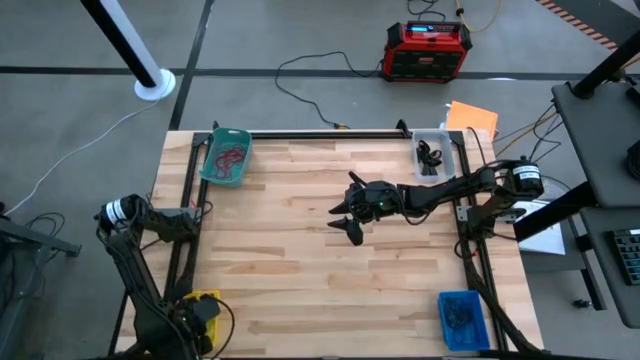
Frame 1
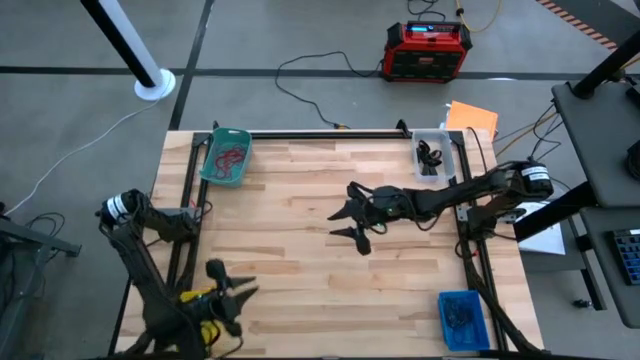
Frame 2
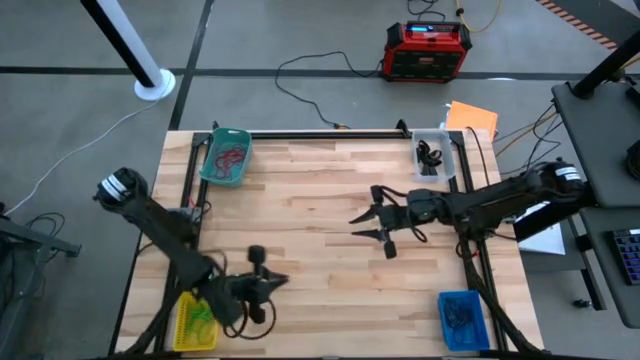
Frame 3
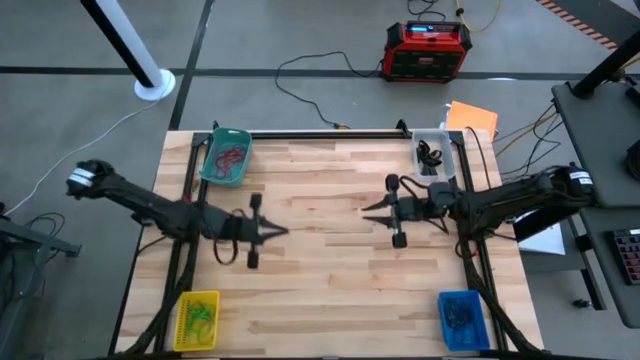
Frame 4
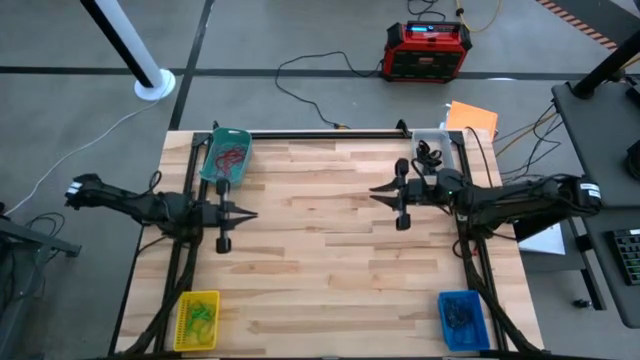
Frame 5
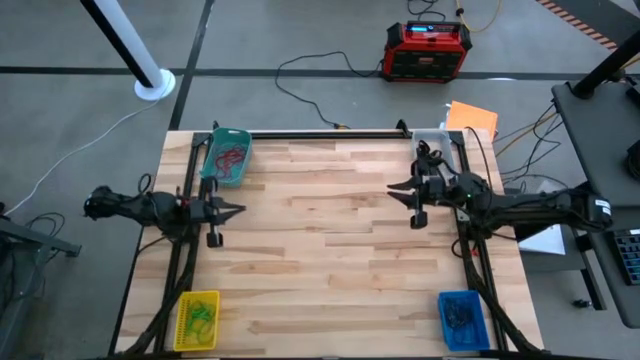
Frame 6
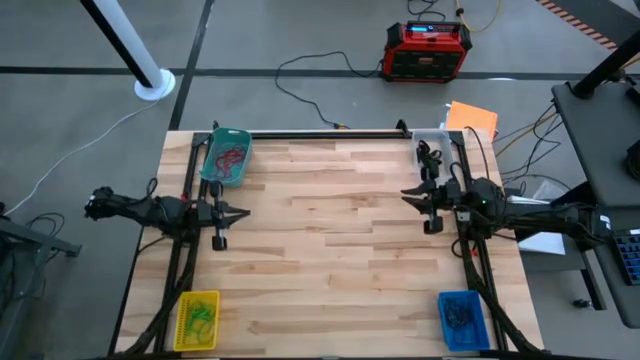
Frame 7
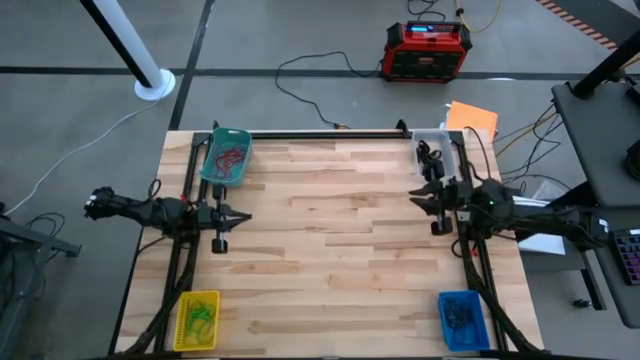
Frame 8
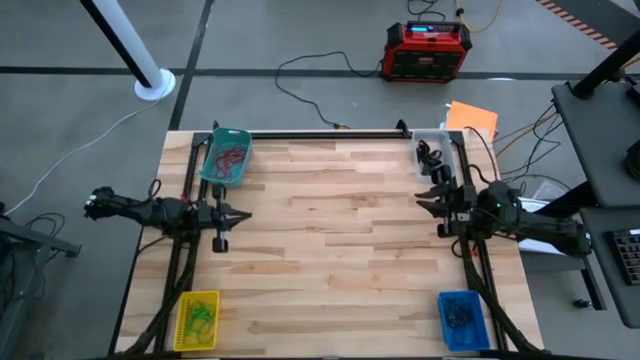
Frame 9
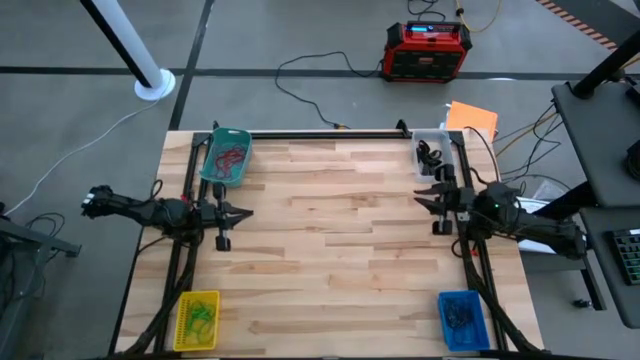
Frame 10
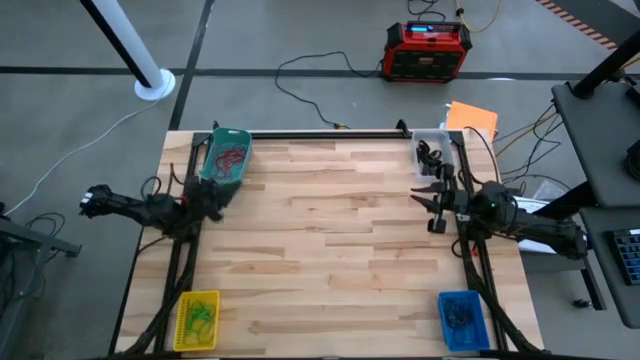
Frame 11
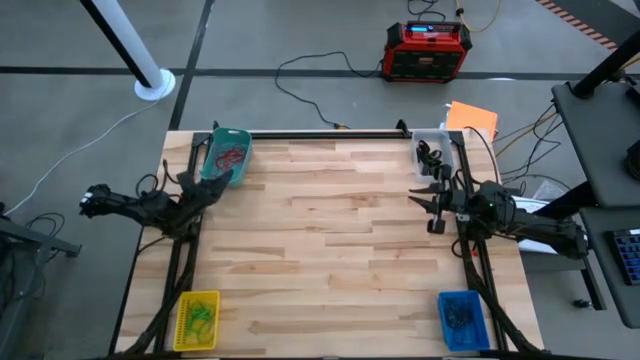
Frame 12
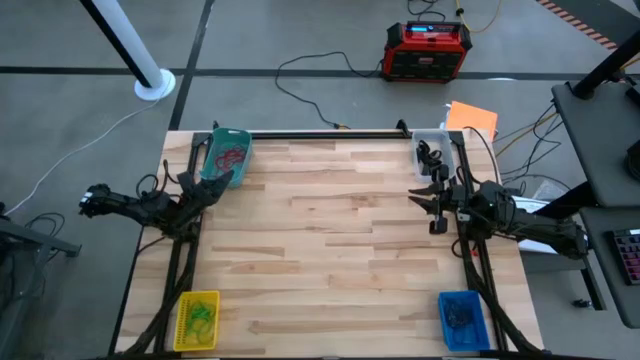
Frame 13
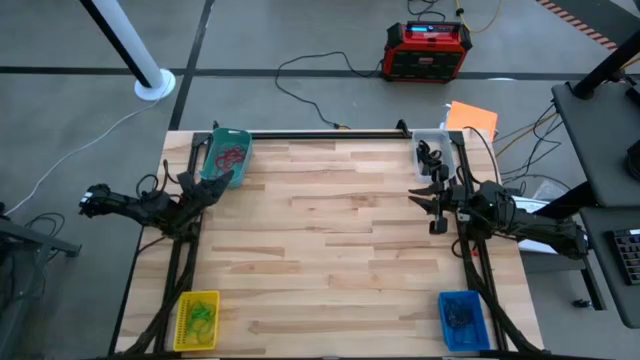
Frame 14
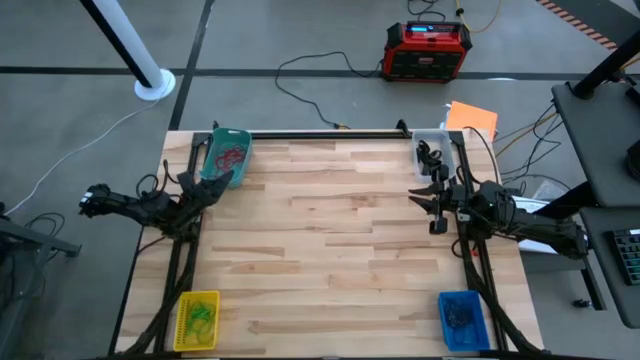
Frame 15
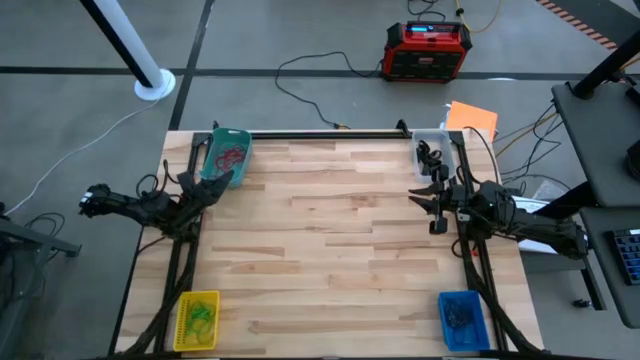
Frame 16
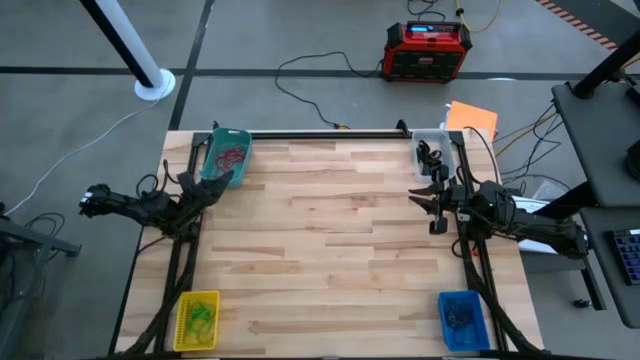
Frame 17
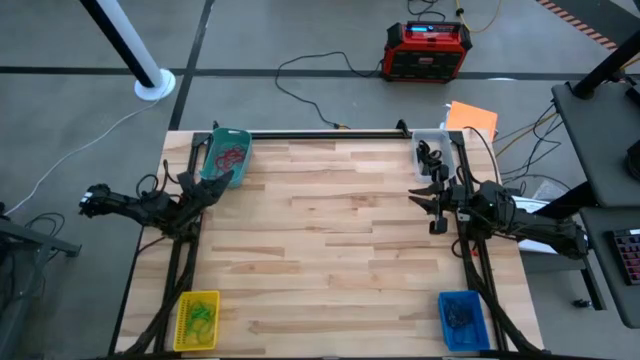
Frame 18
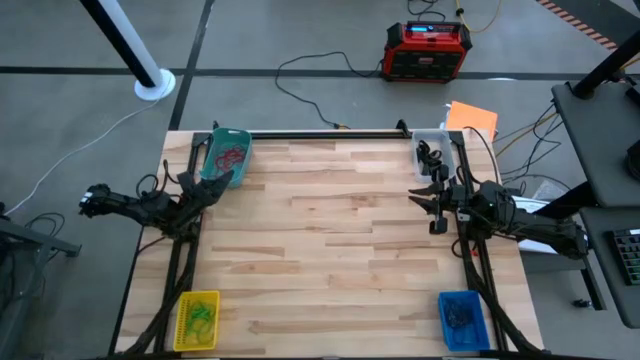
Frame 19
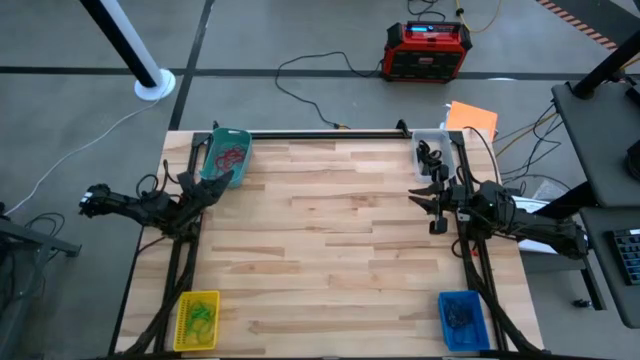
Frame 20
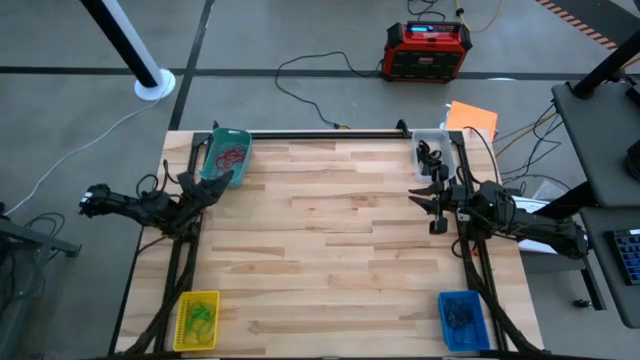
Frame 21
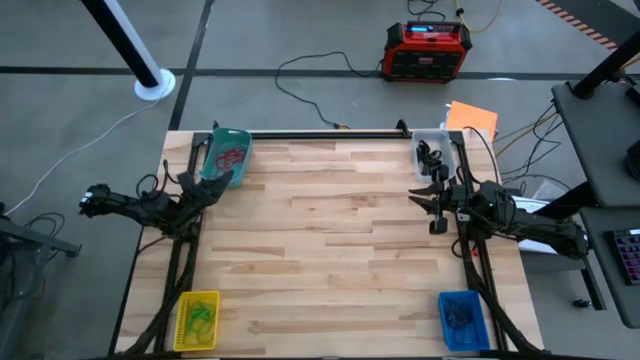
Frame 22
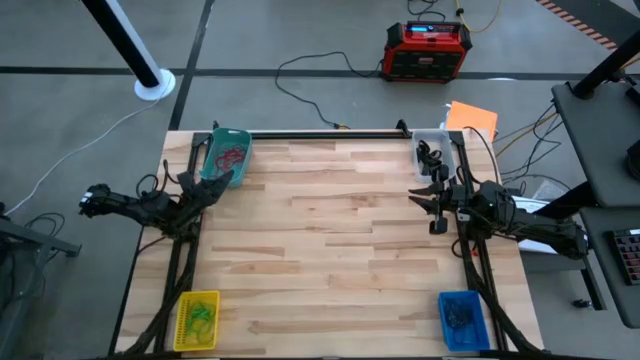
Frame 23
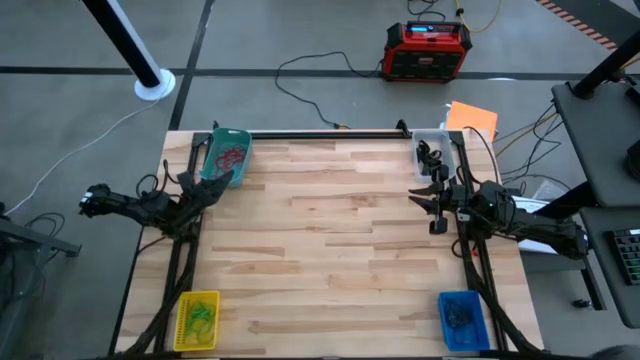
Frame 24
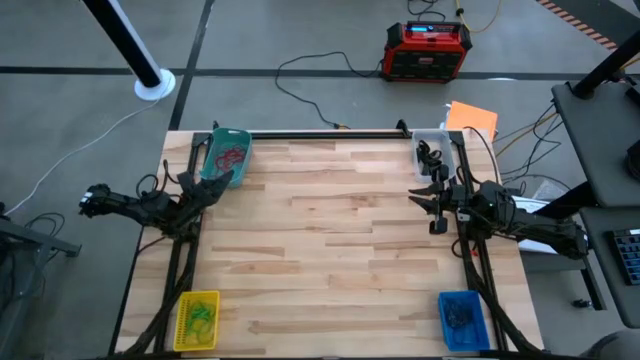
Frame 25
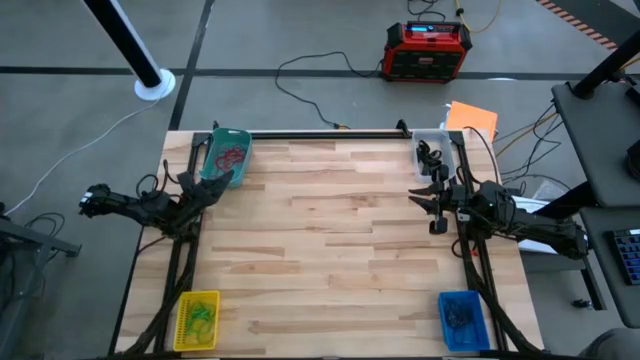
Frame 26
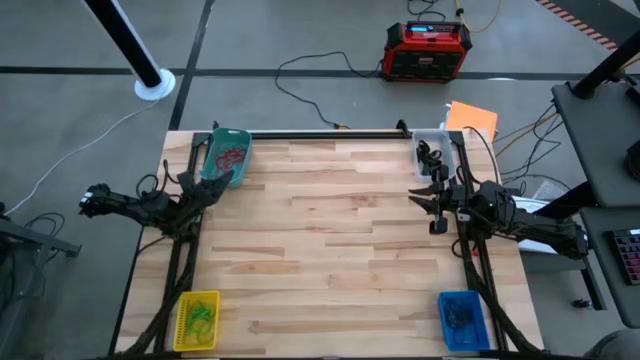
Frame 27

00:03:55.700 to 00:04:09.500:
Task: Sort rubber bands into baskets
Return to Home Position

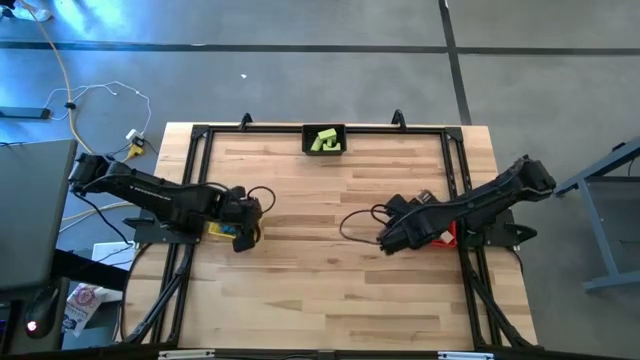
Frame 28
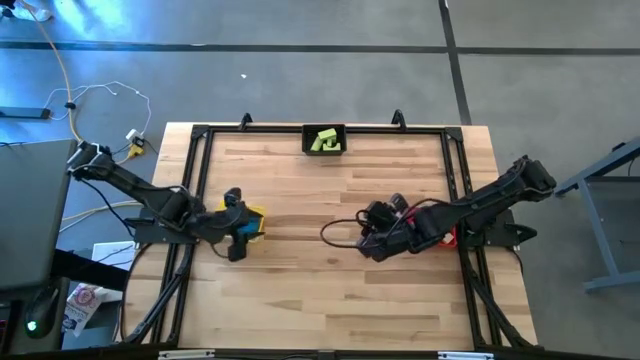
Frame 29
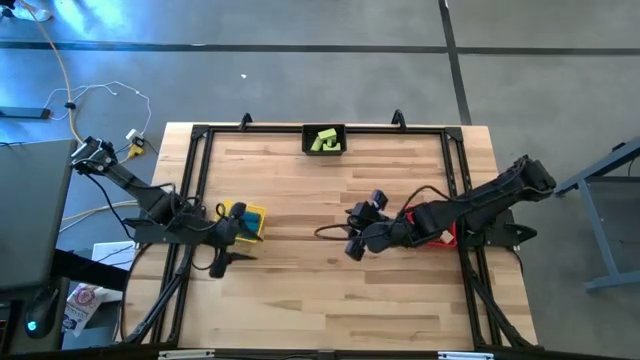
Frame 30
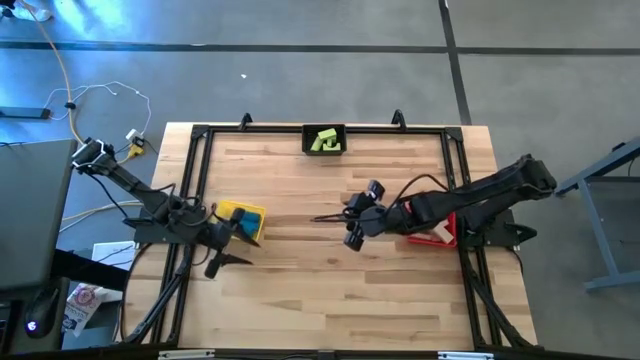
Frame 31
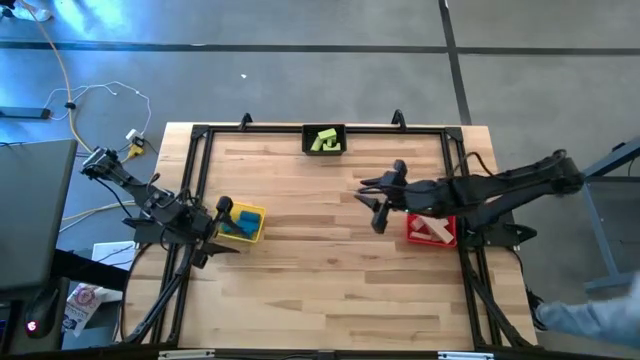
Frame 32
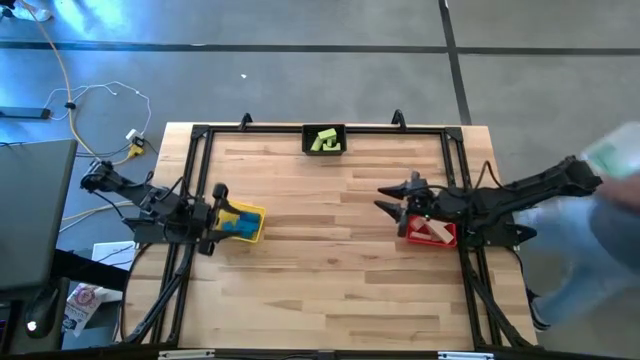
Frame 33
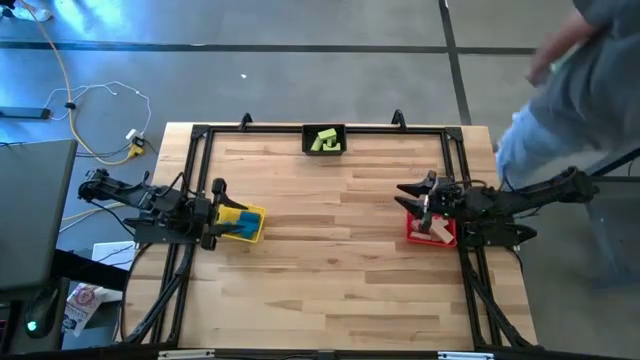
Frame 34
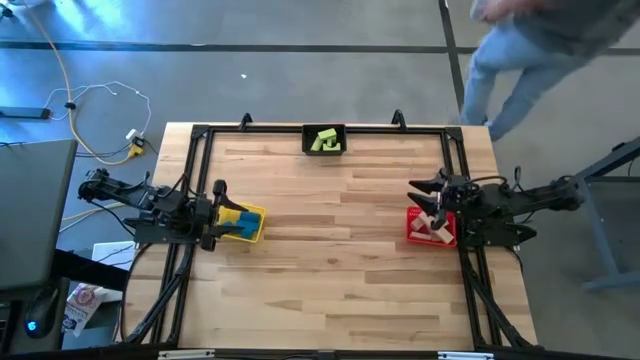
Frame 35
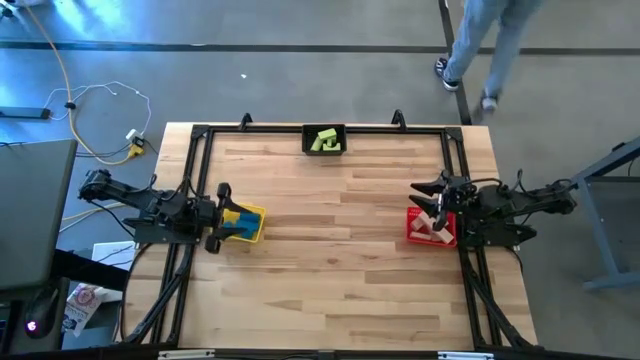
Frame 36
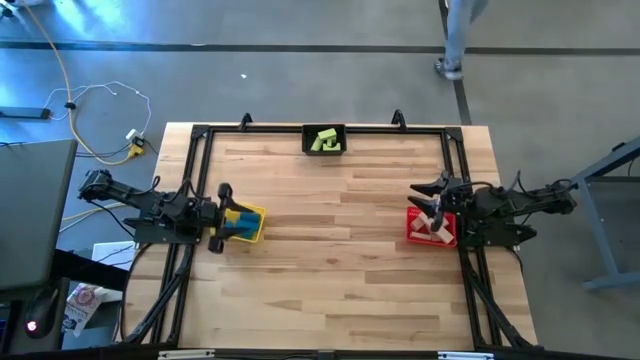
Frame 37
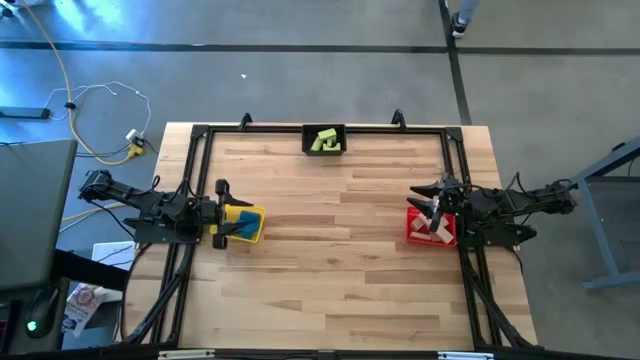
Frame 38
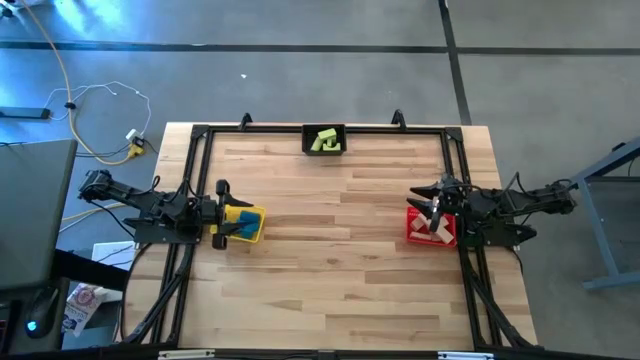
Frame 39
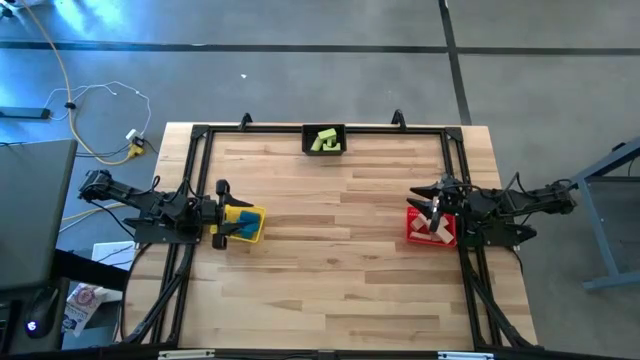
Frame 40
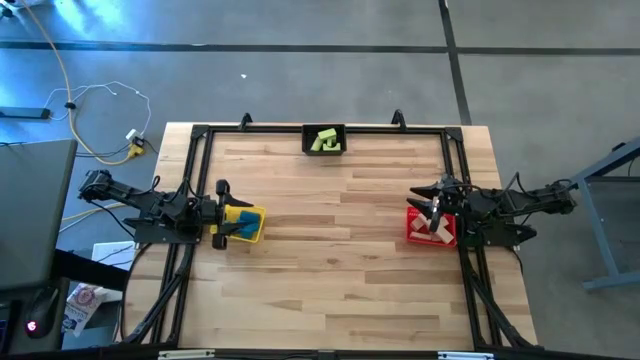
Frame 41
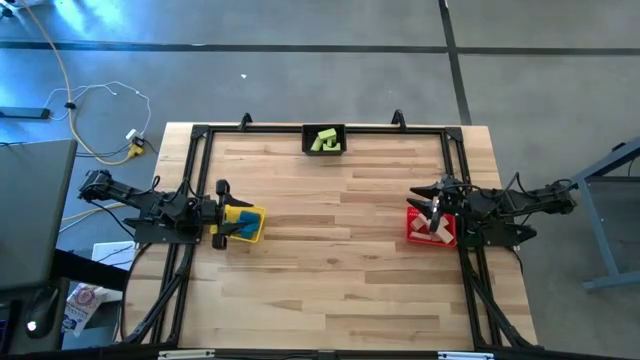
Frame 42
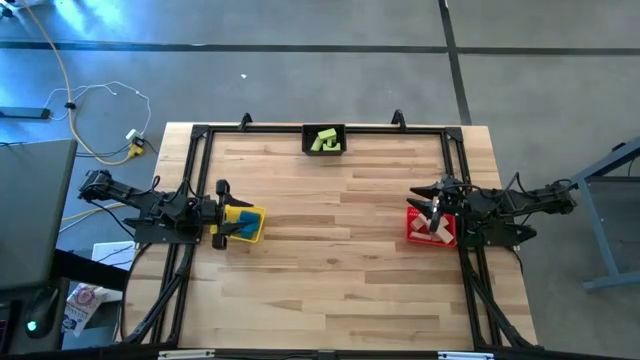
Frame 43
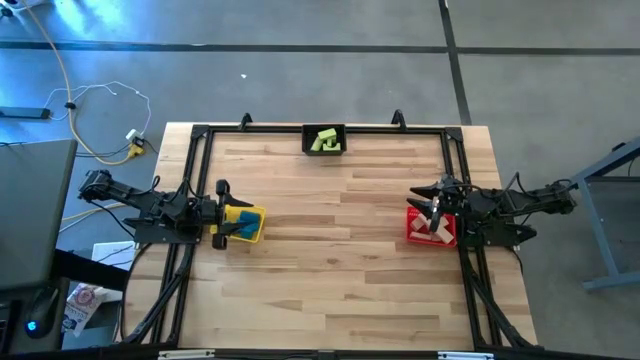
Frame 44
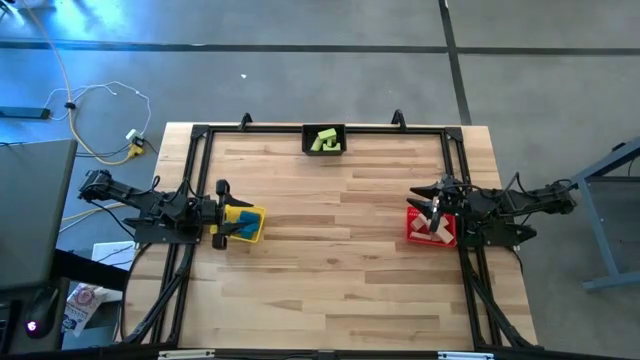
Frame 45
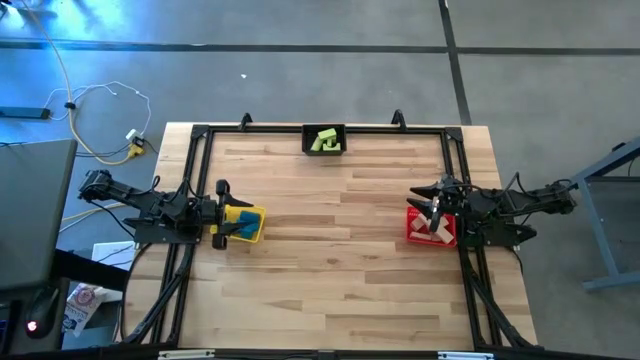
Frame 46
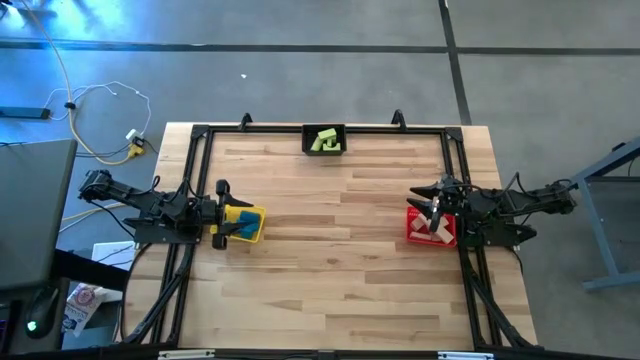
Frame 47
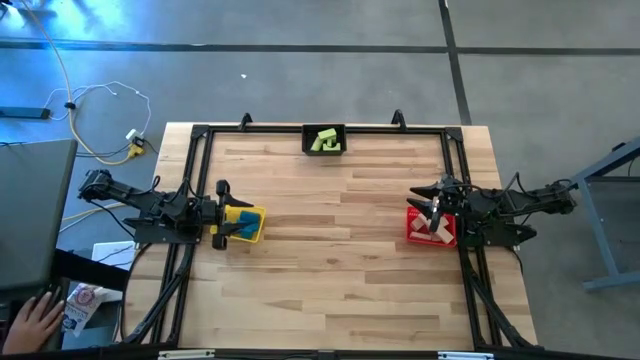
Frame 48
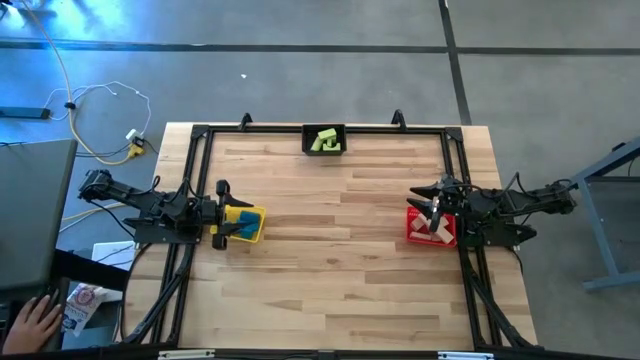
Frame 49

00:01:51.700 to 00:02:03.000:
Task: Sort & place blocks by color
Return to Home Position
